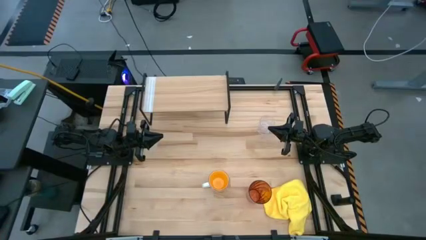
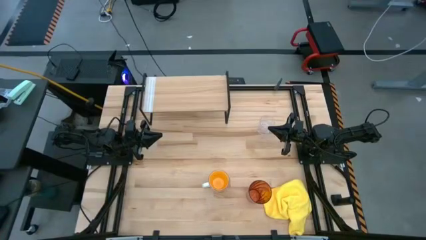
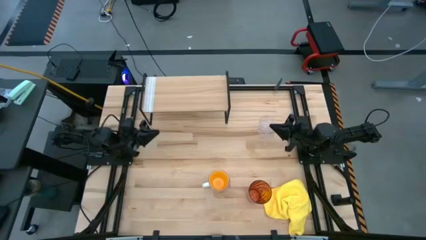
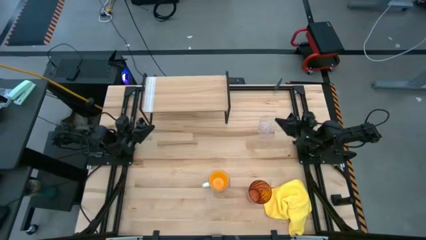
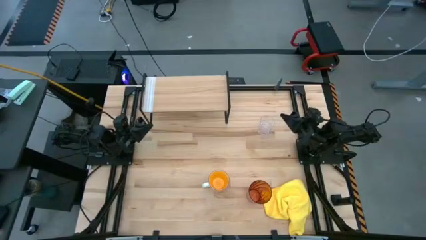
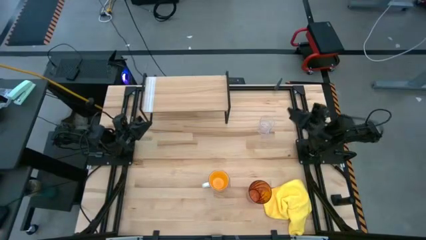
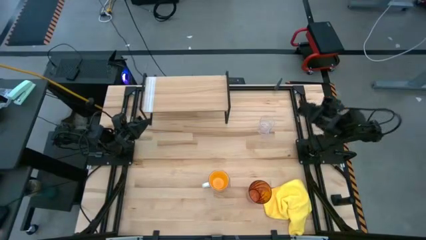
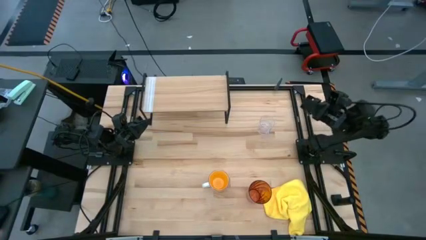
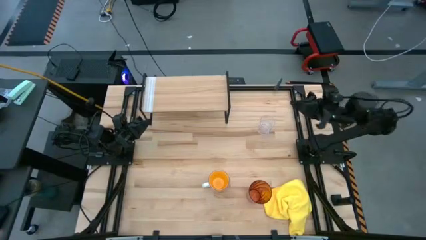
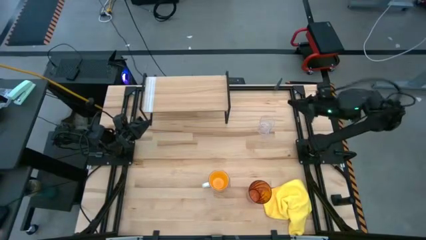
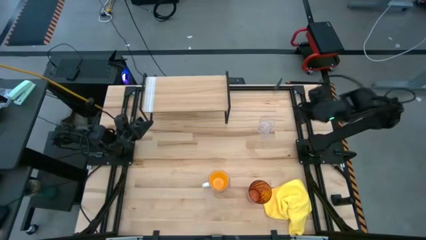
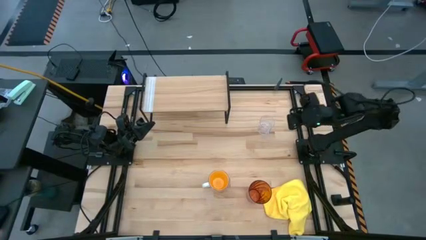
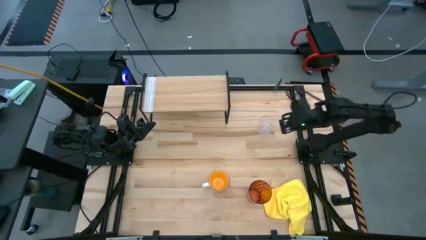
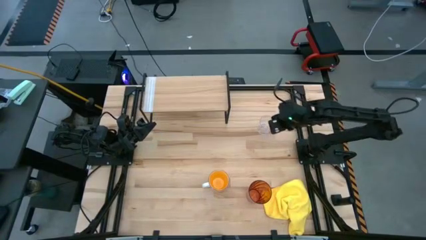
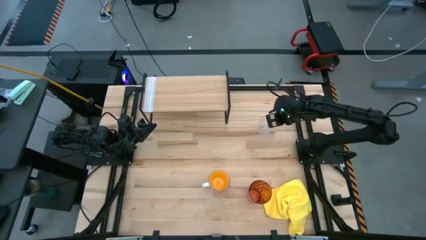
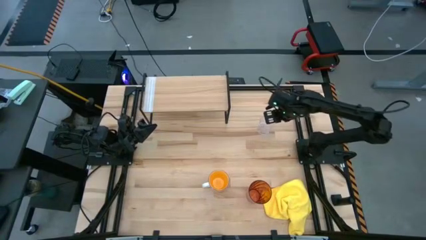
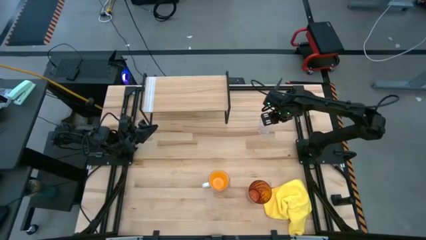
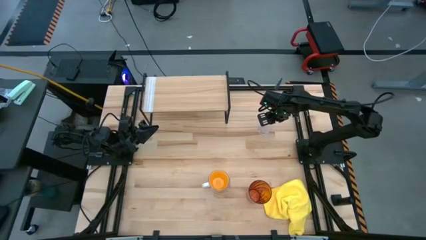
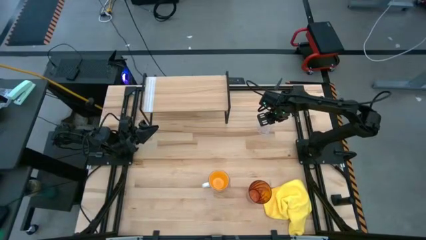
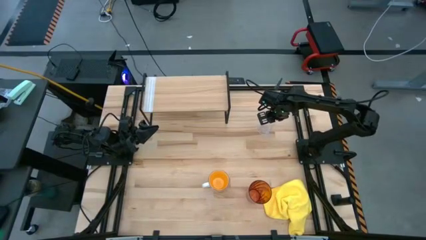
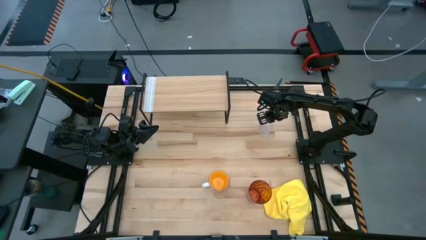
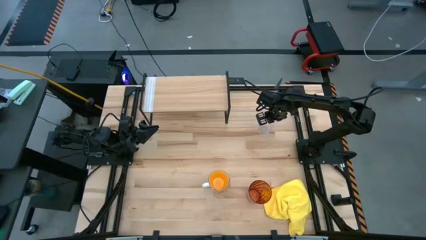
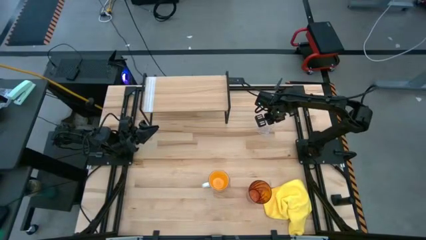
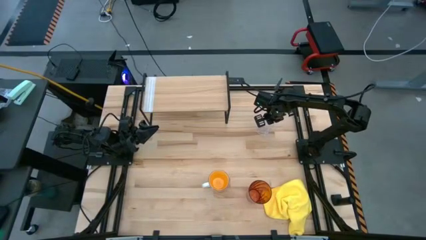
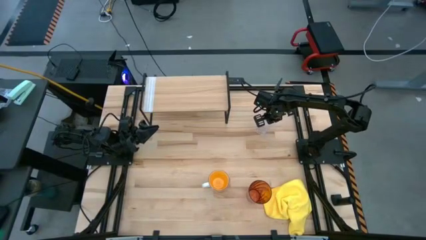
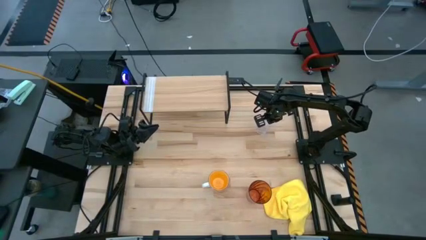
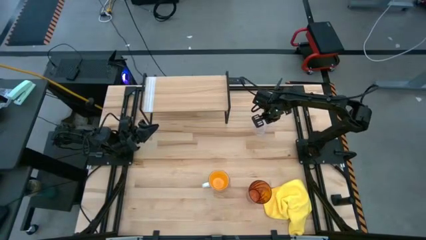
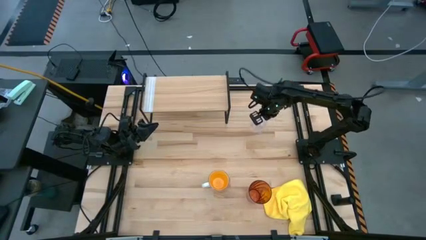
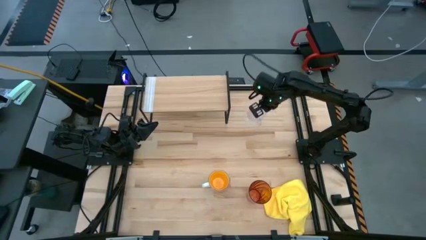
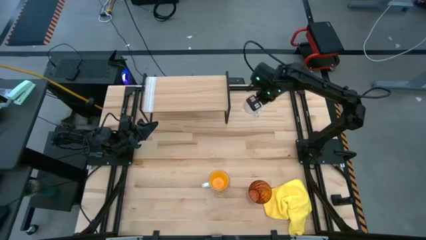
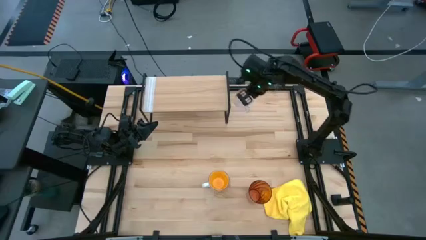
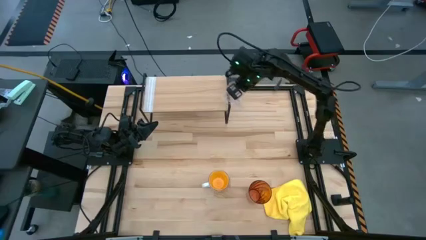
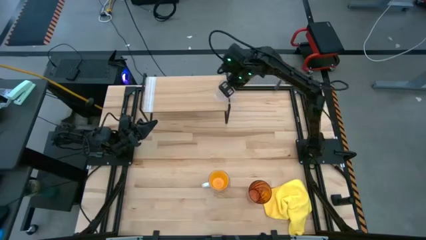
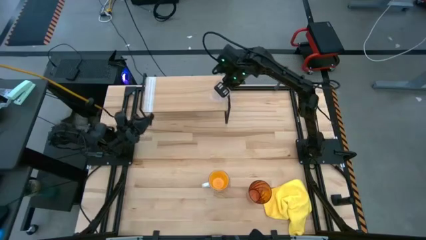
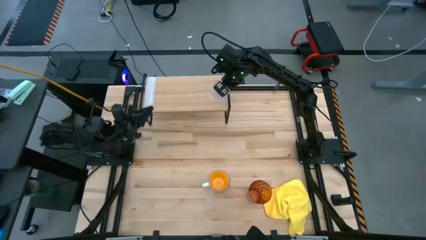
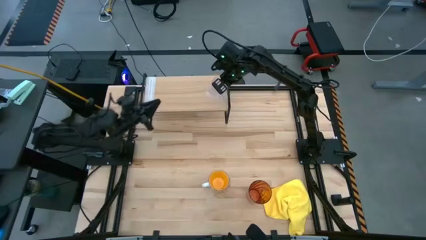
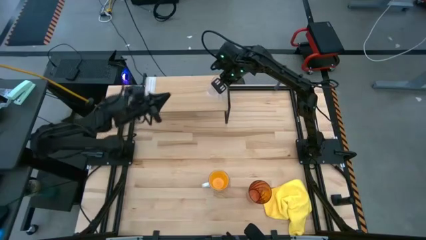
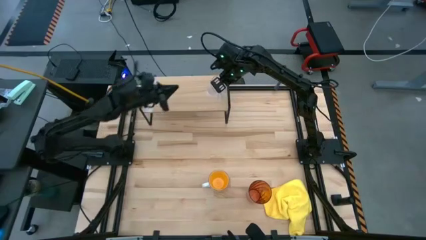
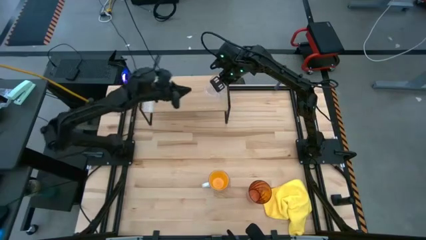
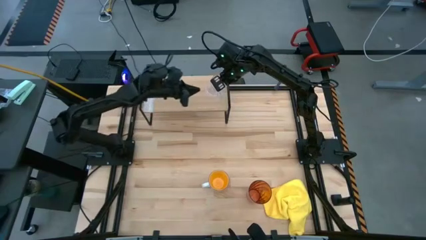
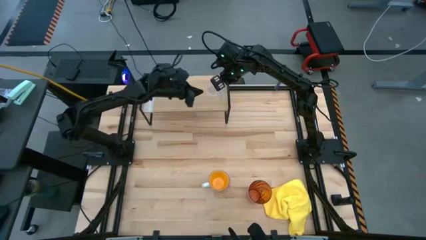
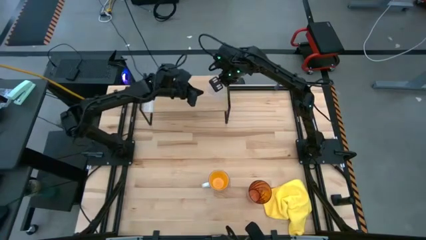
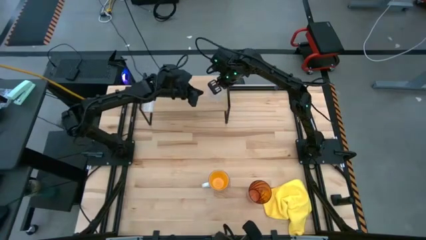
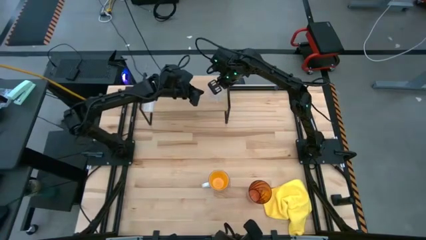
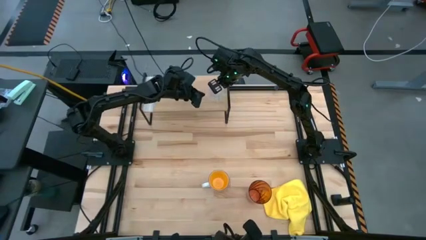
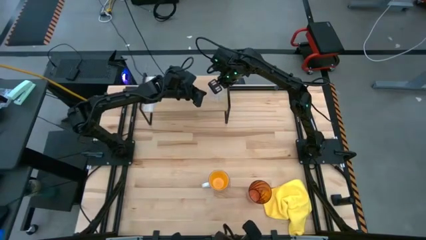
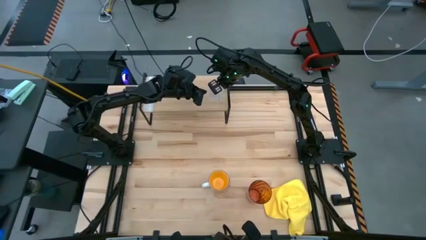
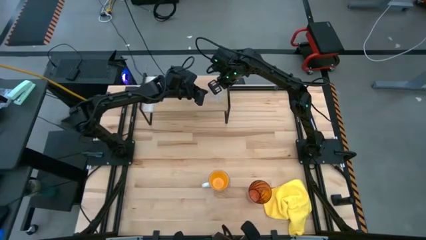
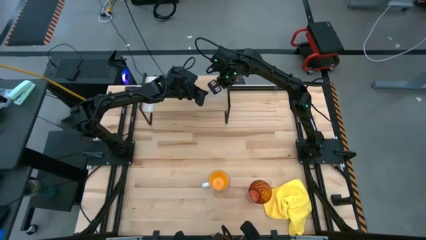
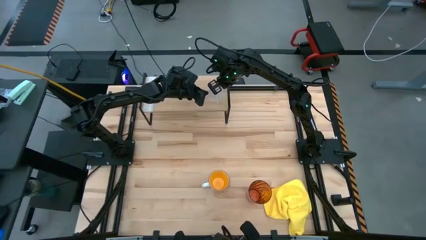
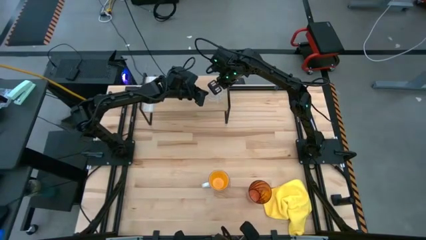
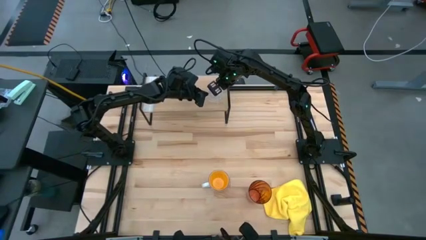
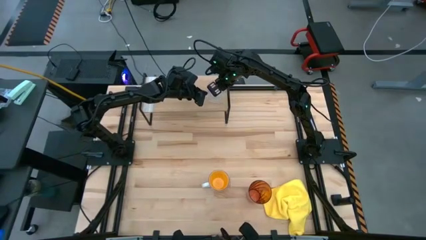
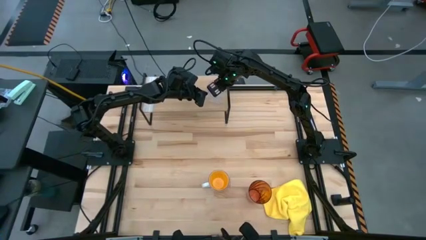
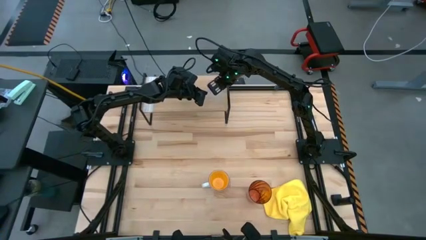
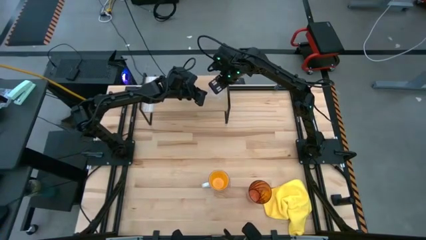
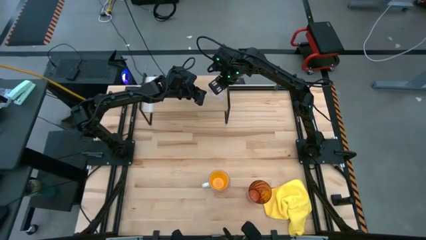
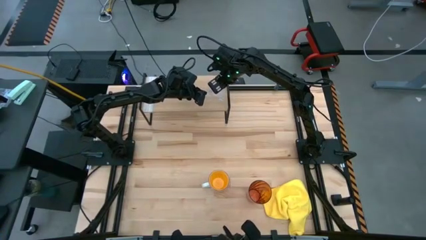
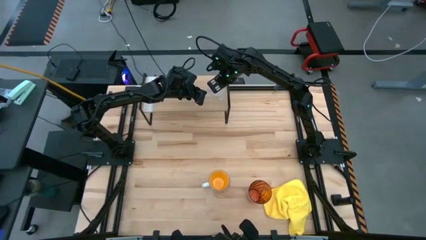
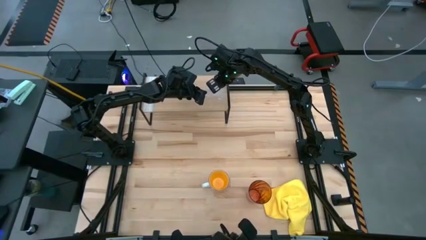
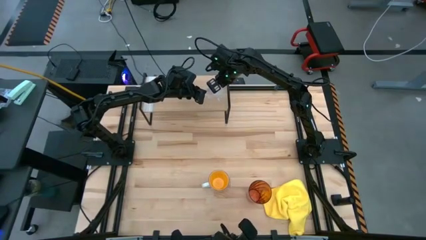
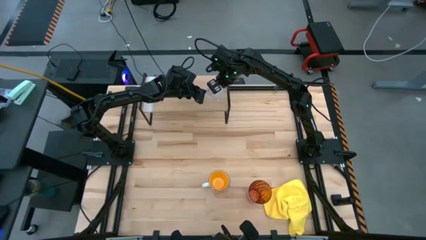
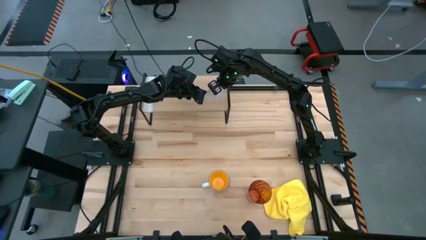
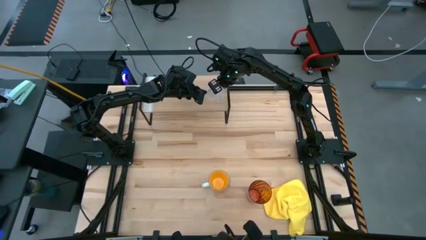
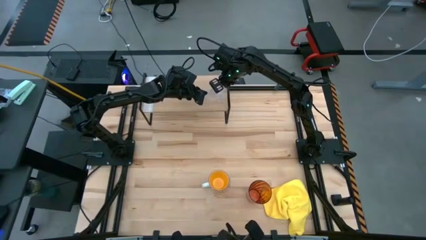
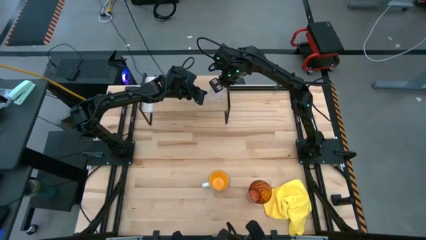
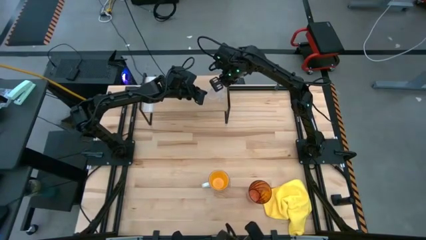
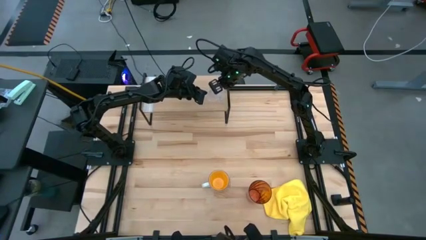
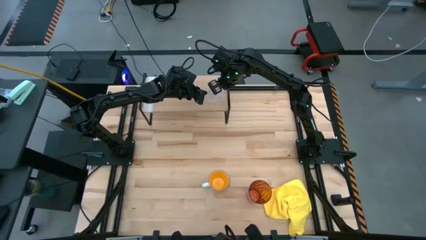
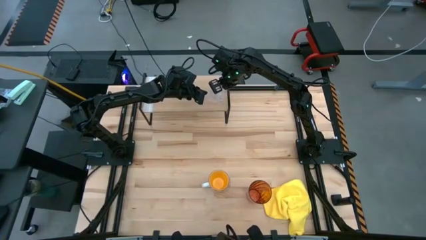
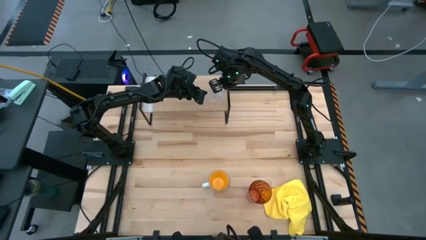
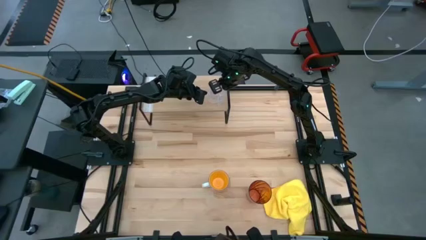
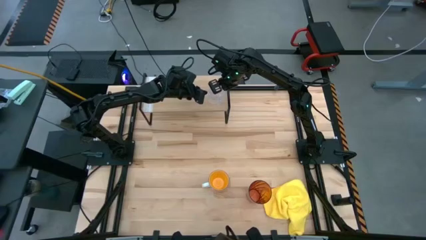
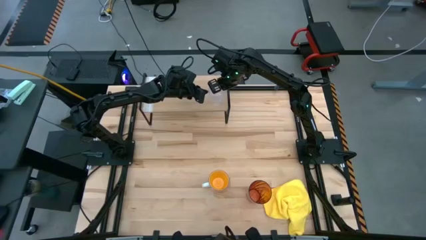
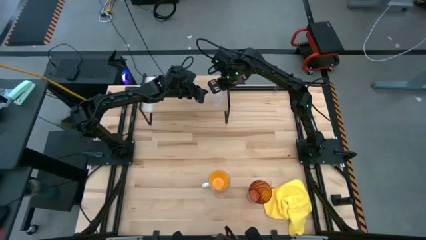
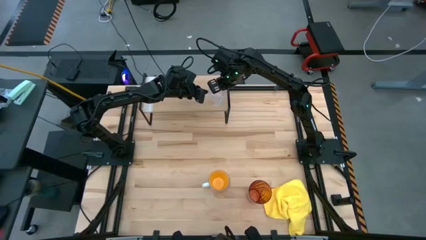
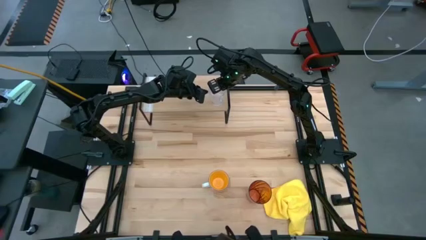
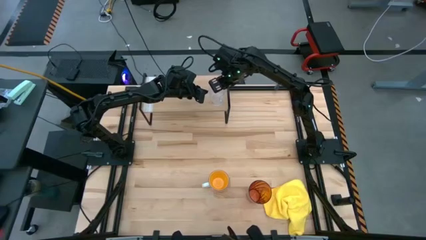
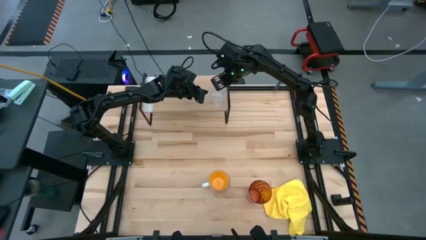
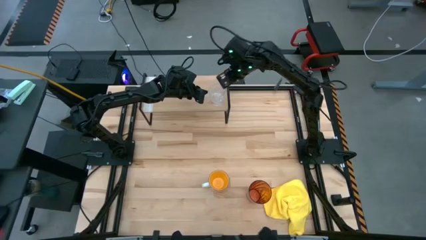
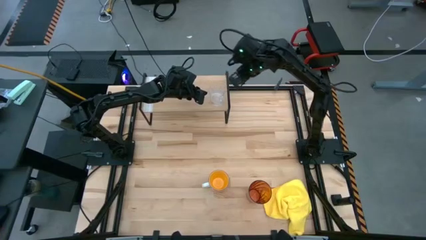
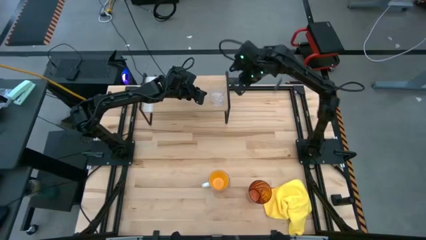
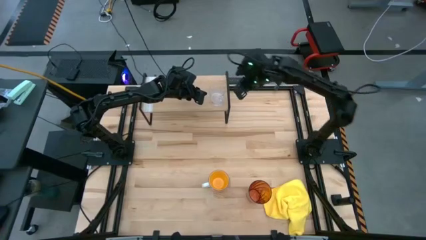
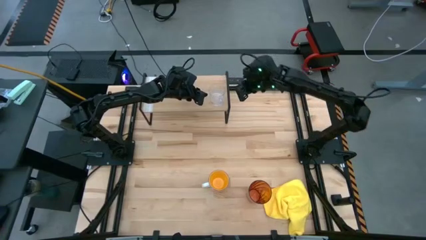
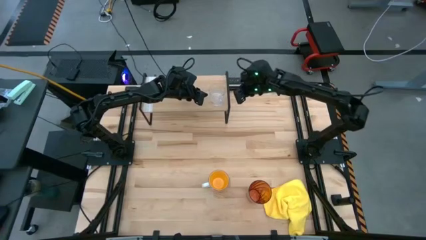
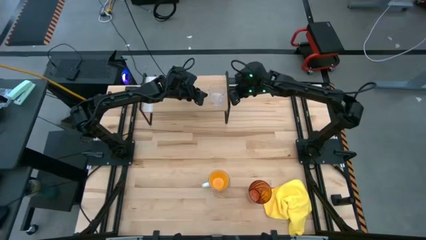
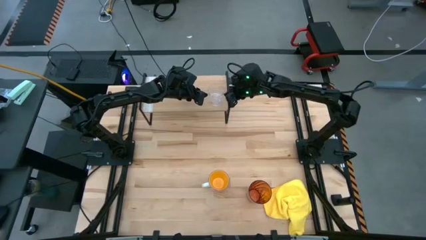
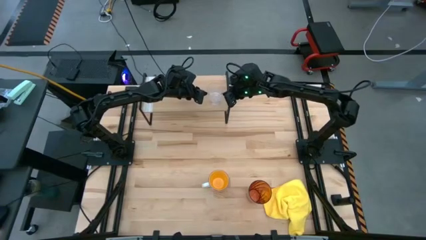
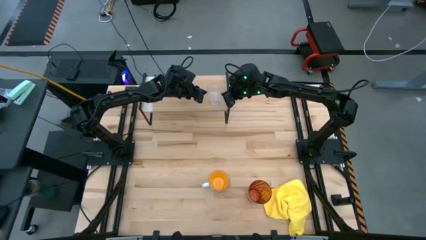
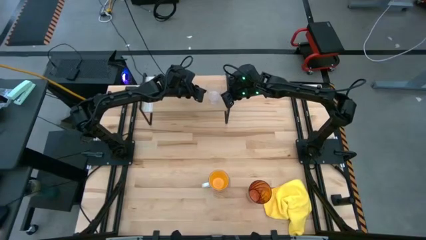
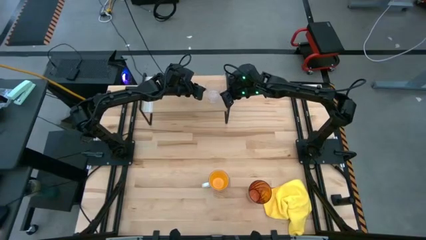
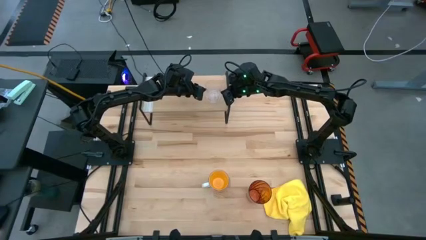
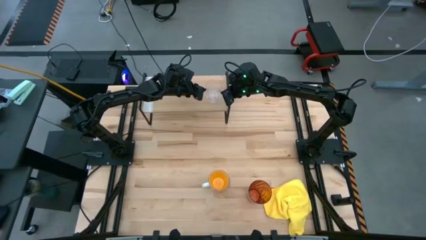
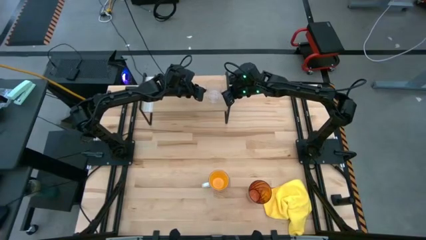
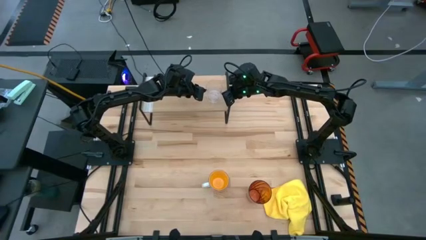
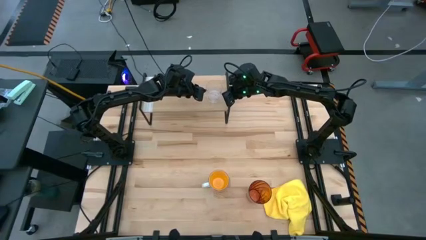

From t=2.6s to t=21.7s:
Task: Stack small to large cups/mugs on shelf
Put the transparent mug on the shelf
